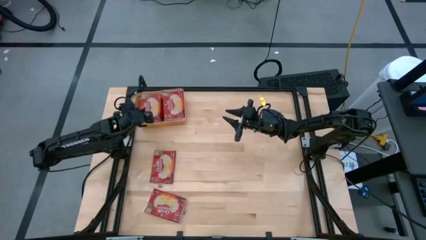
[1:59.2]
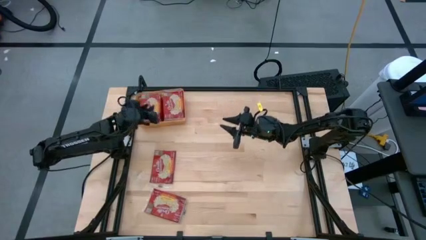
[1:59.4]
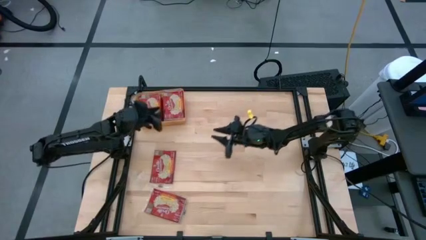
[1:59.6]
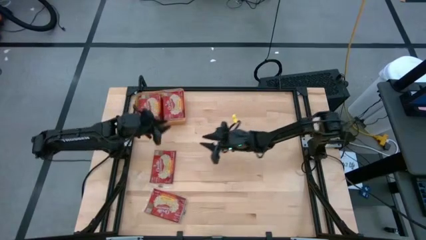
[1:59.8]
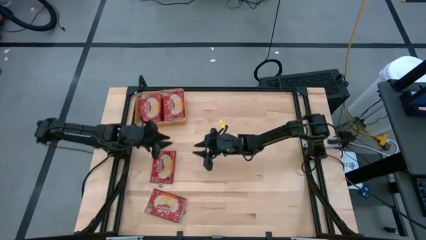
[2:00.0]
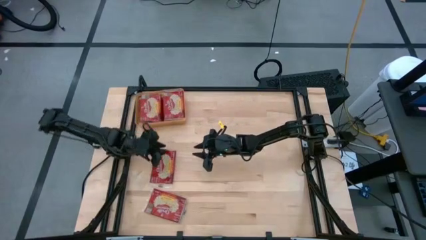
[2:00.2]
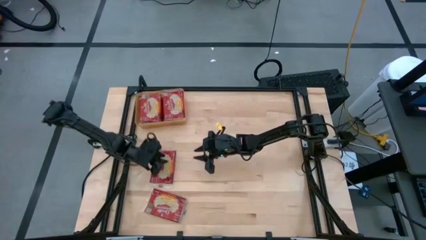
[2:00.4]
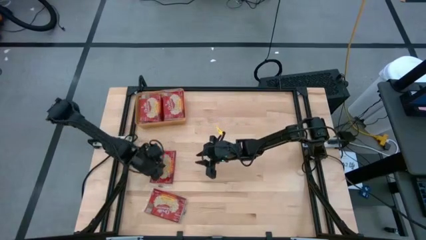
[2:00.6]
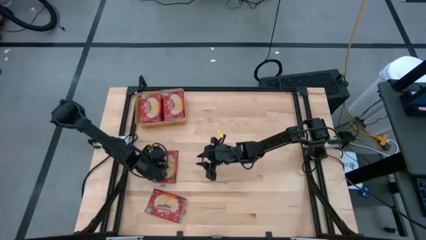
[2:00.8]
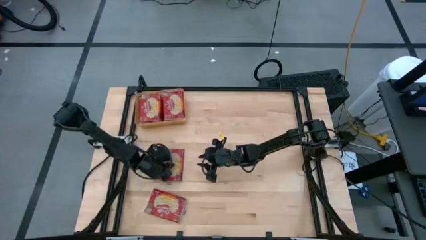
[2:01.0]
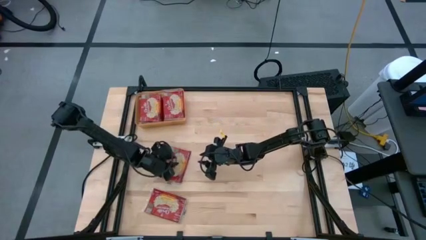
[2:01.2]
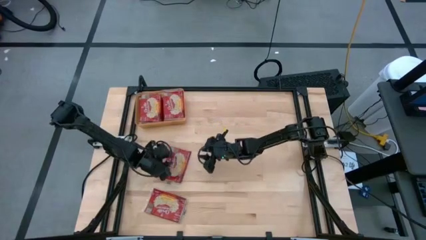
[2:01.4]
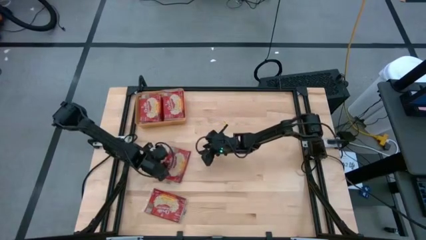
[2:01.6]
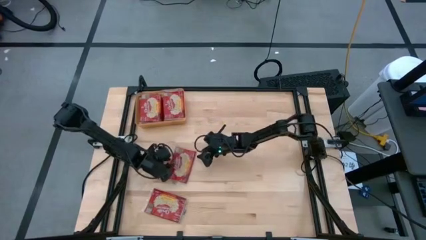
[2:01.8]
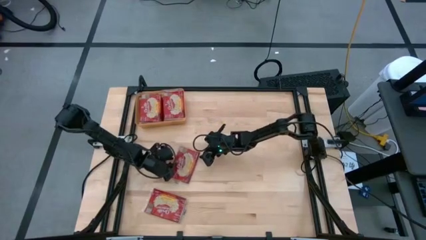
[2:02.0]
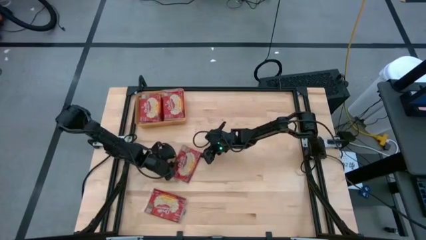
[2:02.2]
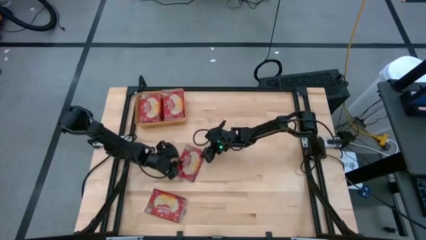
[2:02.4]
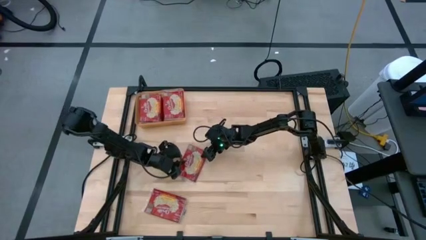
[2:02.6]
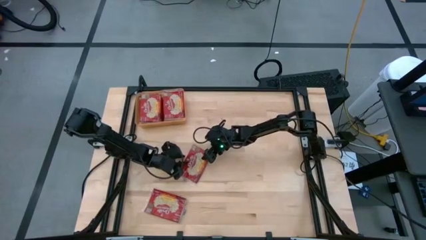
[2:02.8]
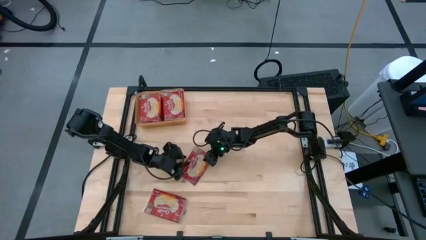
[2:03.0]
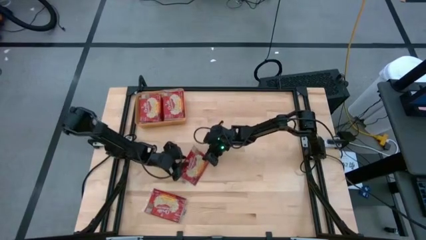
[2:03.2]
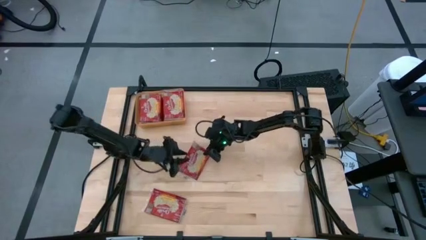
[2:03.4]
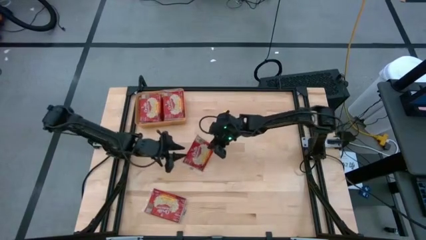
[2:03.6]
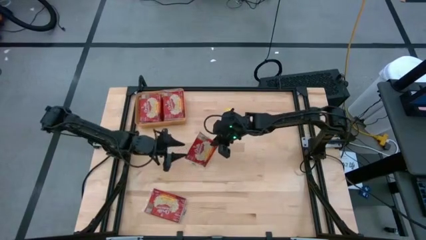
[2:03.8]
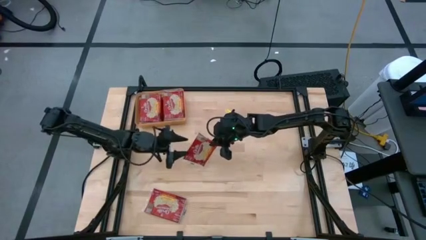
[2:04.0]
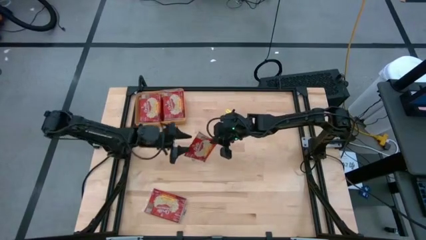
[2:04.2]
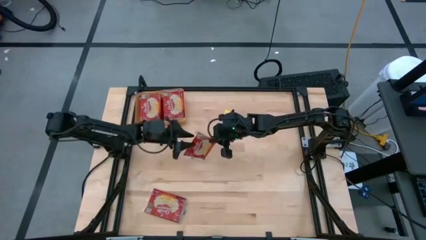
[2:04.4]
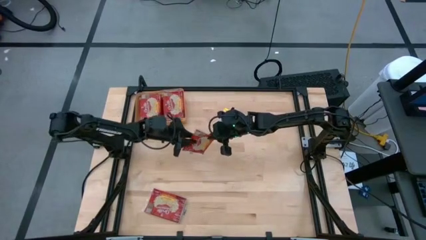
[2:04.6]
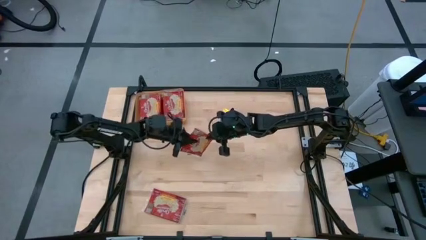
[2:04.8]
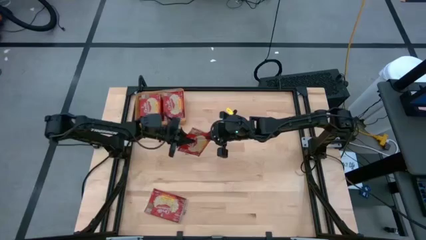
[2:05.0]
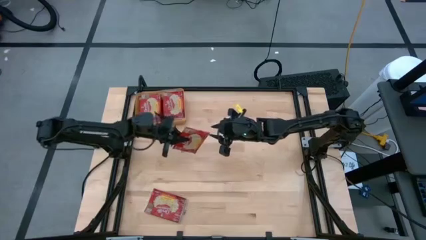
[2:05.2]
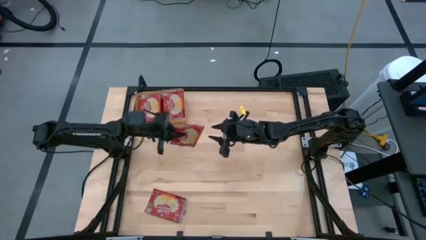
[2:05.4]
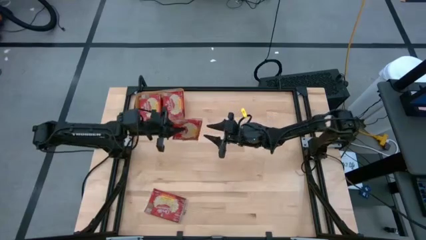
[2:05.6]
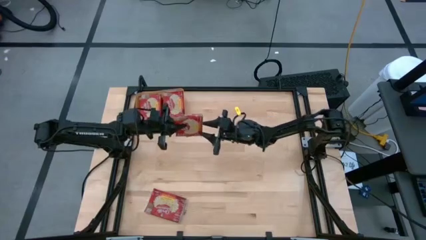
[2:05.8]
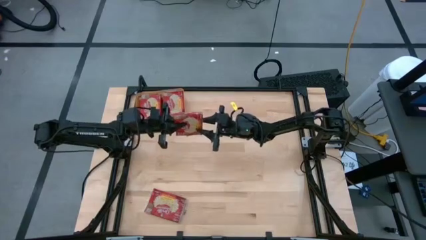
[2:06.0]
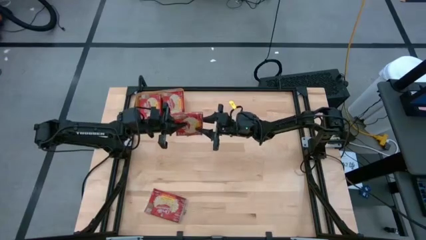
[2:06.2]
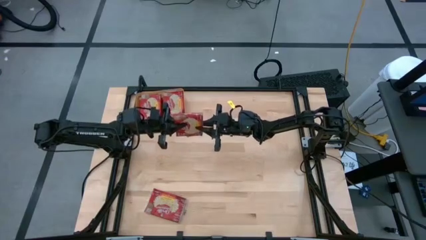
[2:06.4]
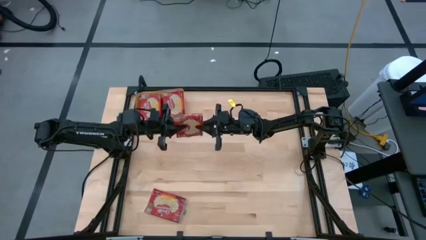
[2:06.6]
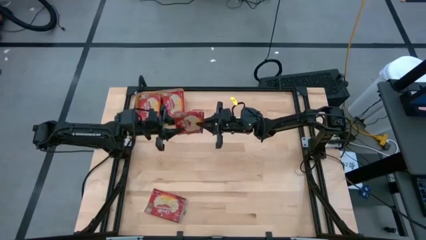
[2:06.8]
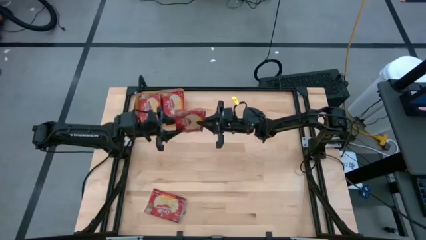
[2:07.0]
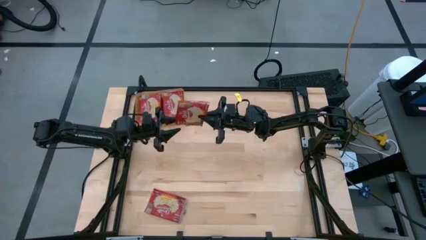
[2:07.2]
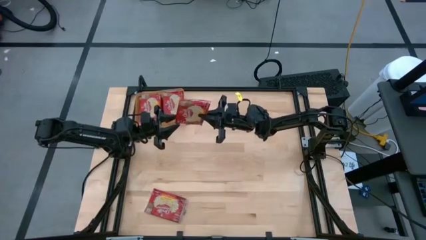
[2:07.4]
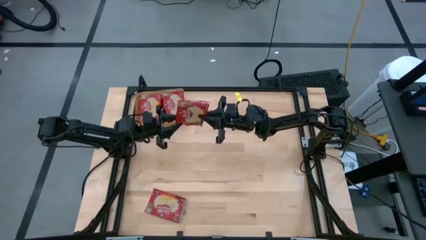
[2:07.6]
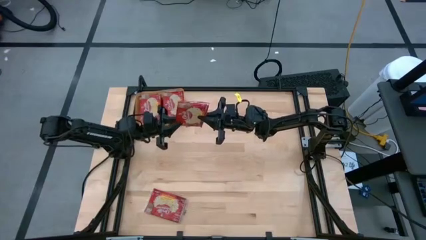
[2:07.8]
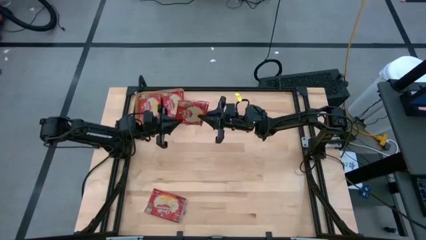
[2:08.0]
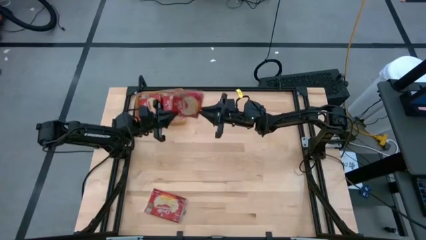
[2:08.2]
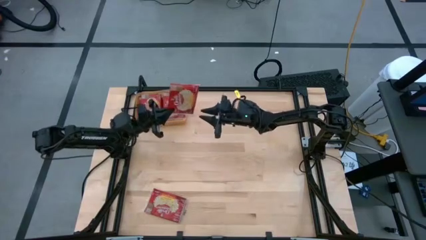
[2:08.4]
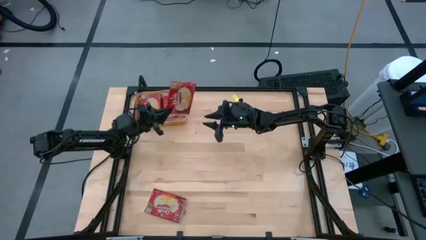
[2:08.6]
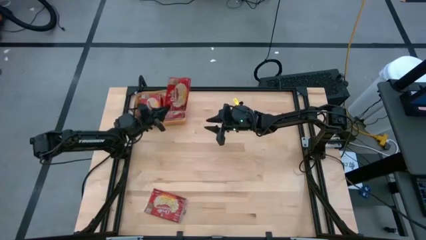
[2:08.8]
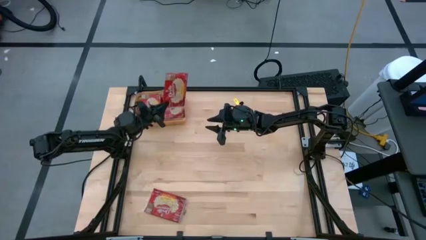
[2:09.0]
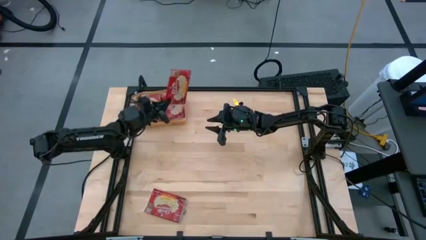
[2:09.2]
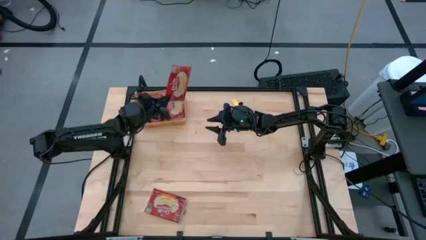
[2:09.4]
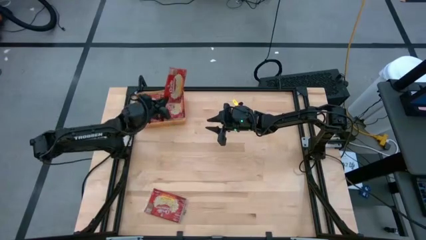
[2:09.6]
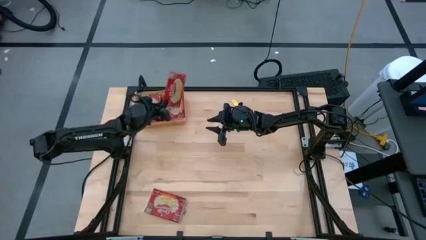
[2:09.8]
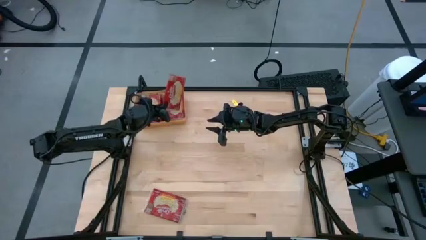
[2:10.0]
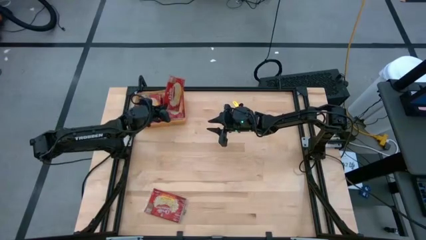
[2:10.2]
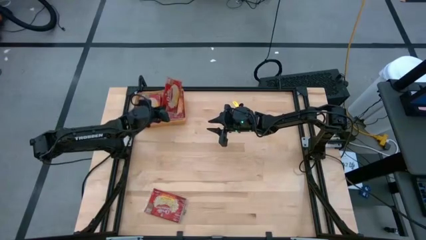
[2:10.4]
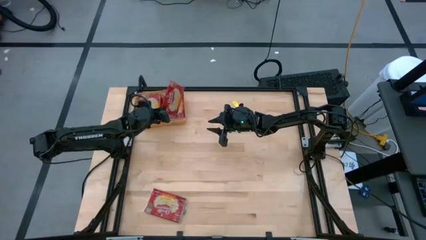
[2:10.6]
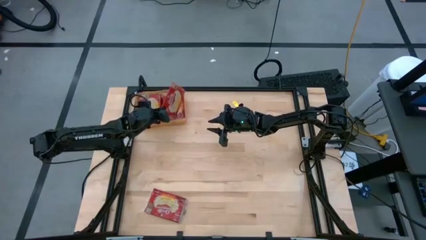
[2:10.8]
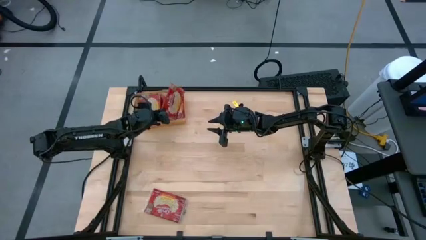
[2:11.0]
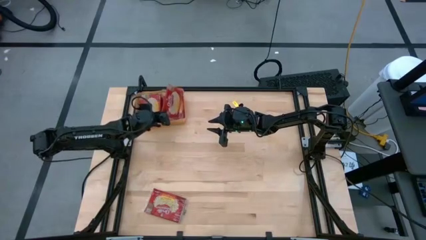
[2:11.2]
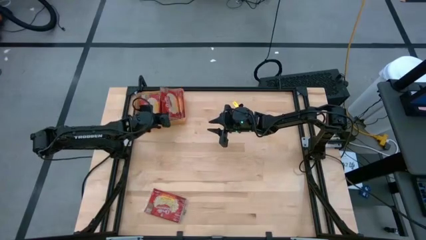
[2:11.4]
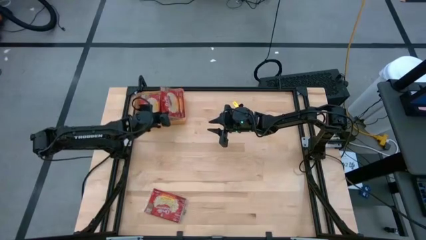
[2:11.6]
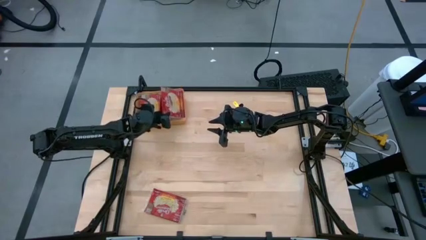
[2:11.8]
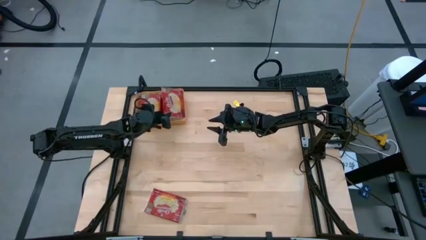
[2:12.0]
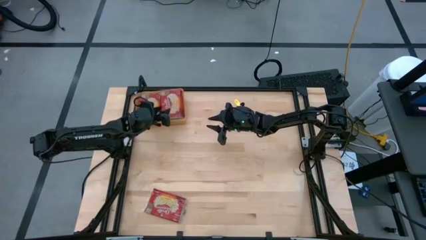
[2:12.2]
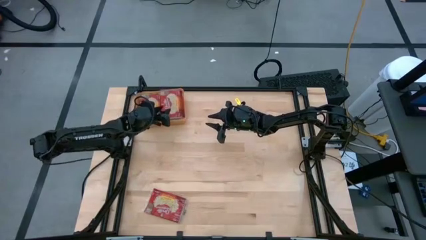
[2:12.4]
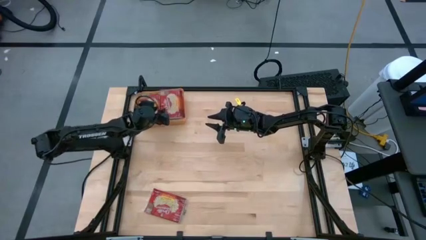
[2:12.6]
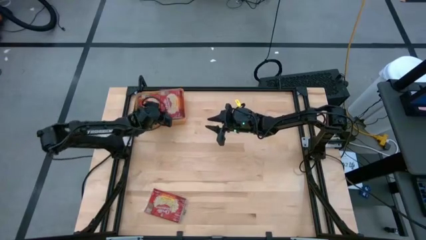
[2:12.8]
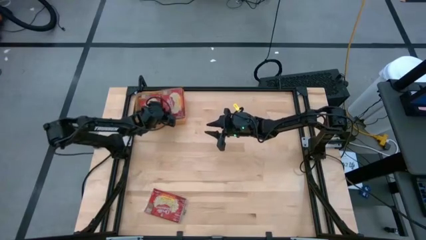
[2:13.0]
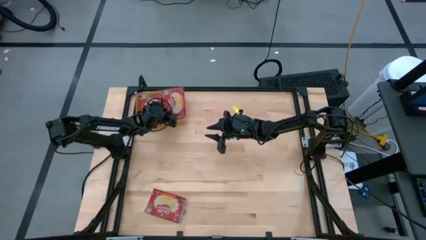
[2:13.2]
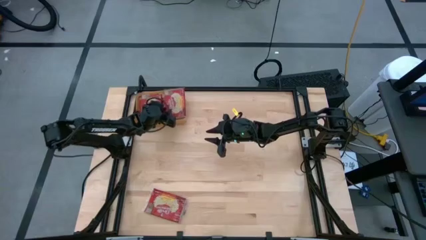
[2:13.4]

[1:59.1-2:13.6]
Task: Sort popcorn bags into baskets
Put the red popcorn bag into the orange bin
